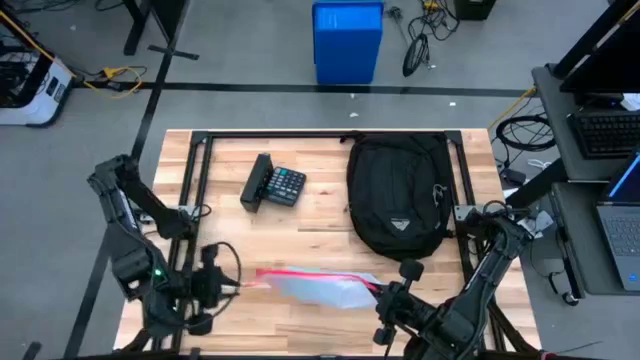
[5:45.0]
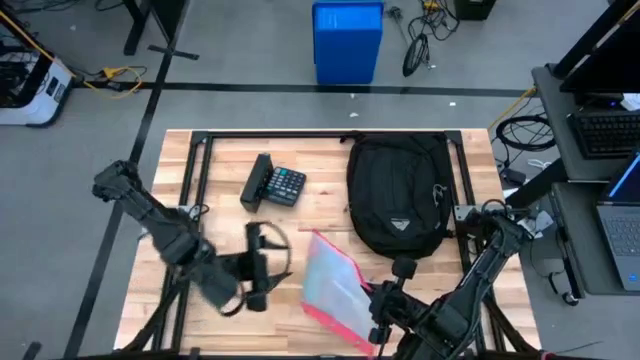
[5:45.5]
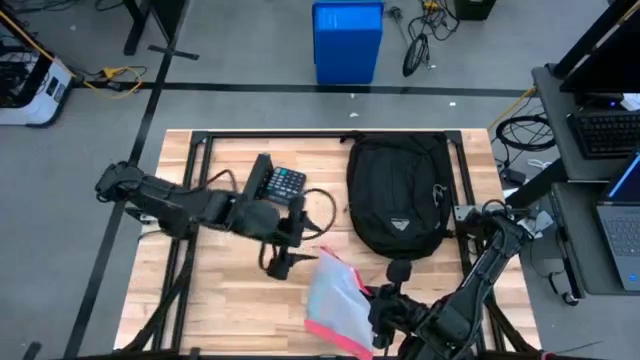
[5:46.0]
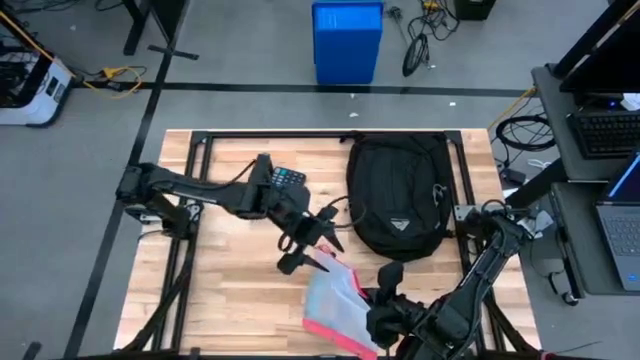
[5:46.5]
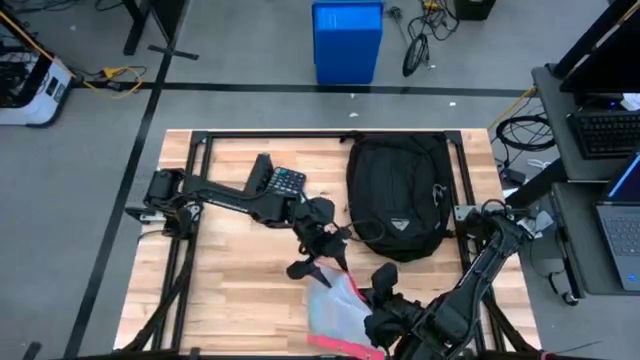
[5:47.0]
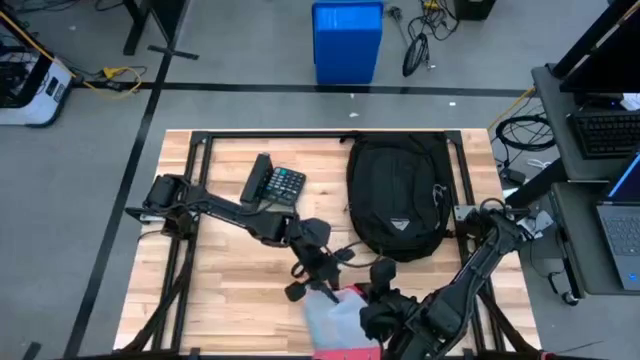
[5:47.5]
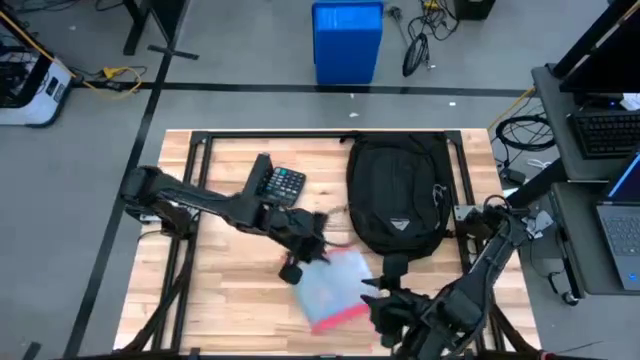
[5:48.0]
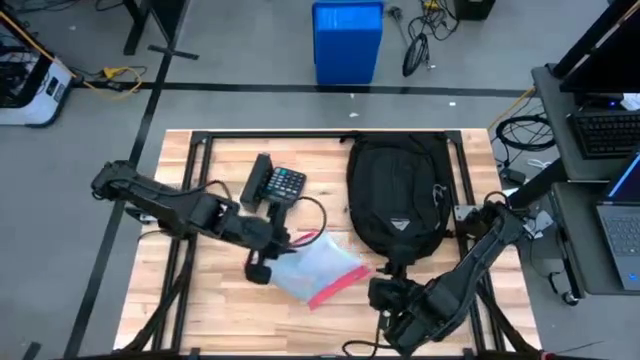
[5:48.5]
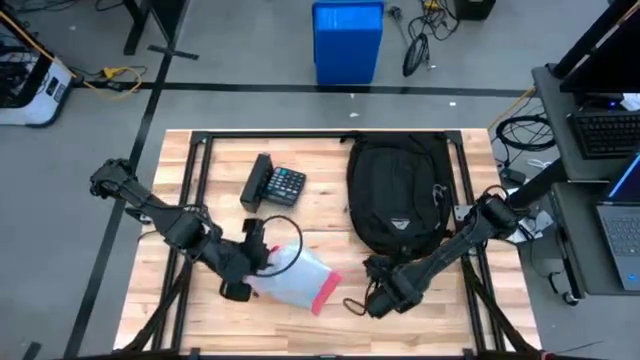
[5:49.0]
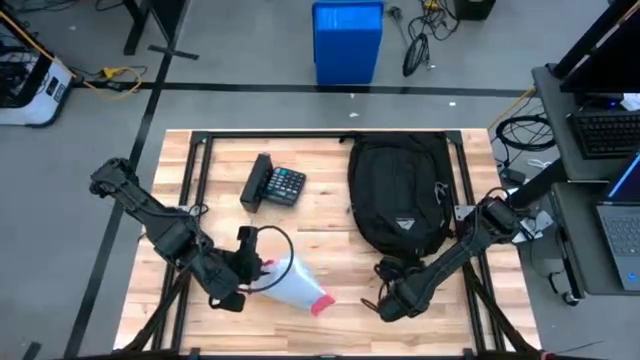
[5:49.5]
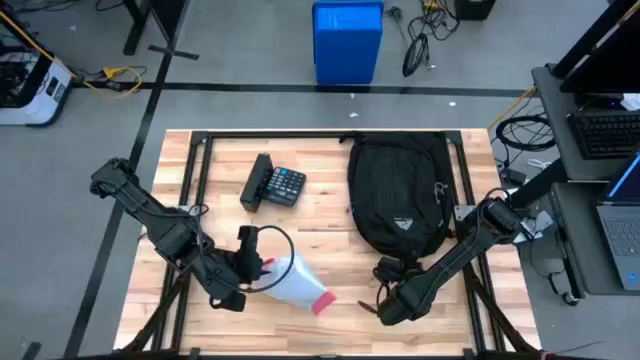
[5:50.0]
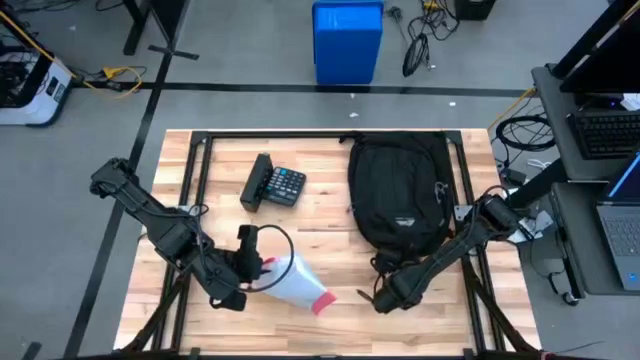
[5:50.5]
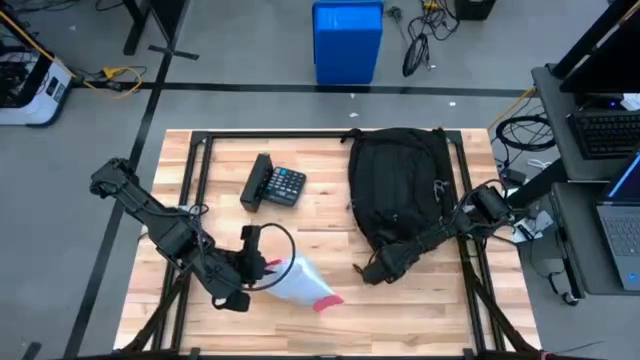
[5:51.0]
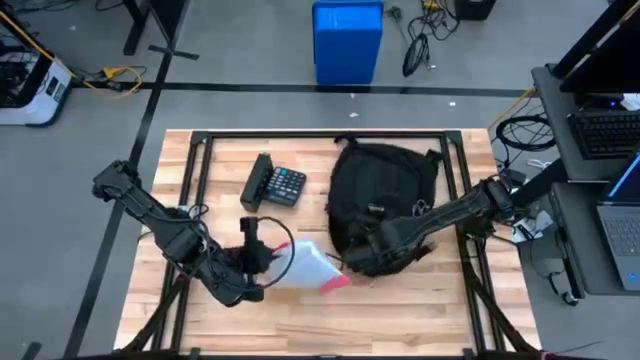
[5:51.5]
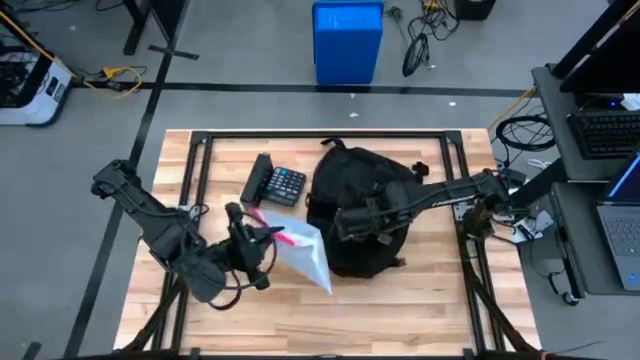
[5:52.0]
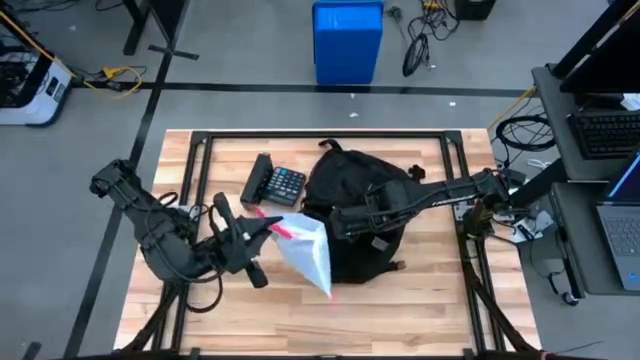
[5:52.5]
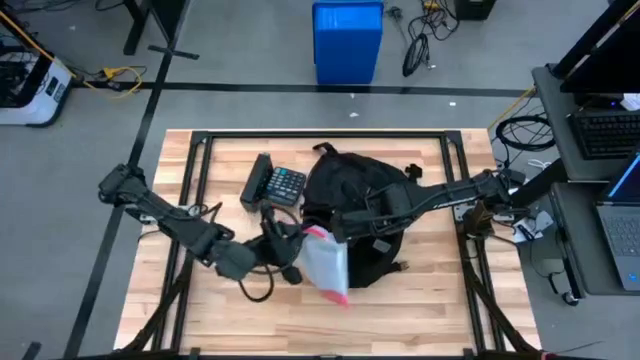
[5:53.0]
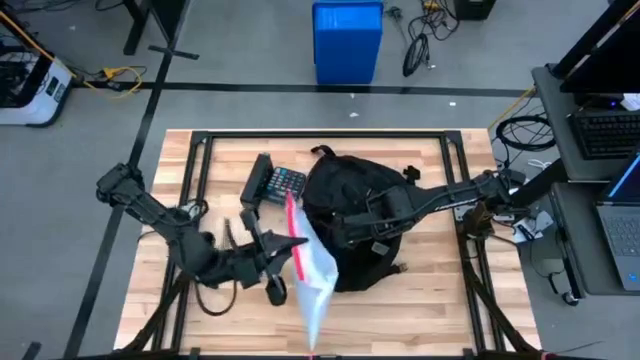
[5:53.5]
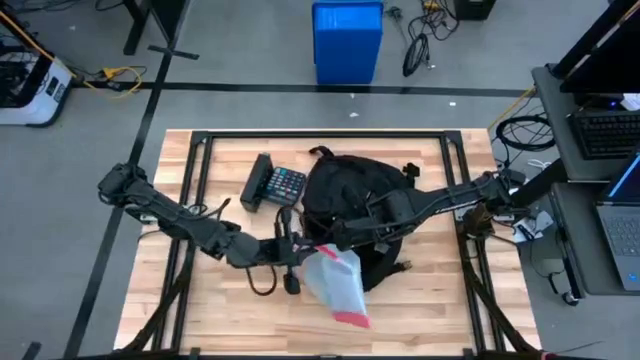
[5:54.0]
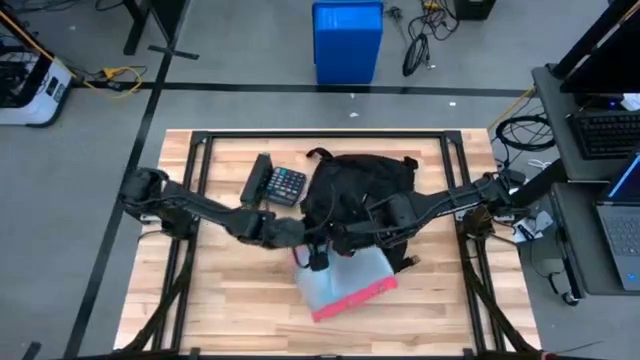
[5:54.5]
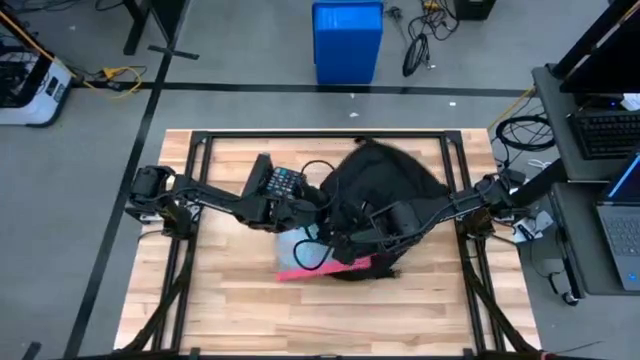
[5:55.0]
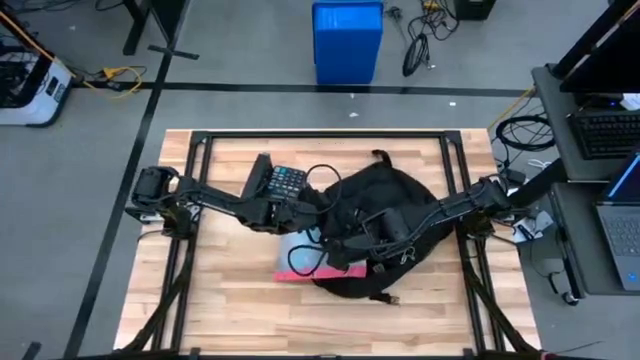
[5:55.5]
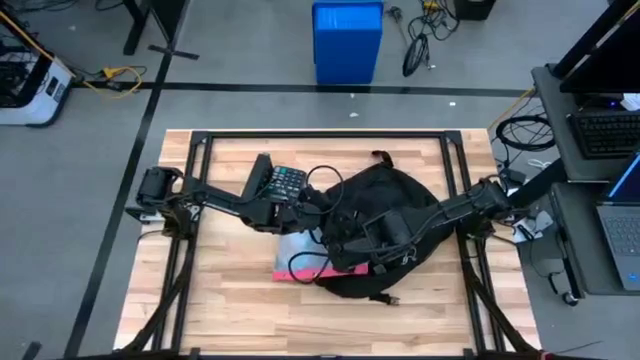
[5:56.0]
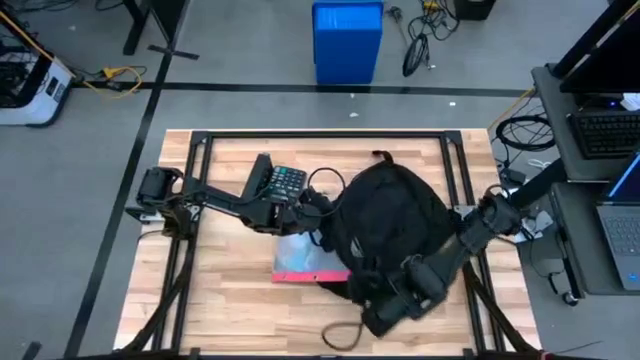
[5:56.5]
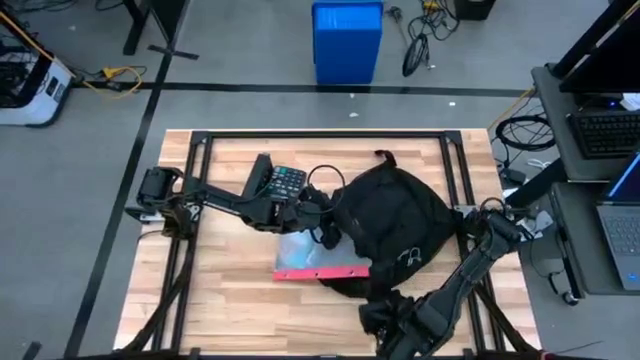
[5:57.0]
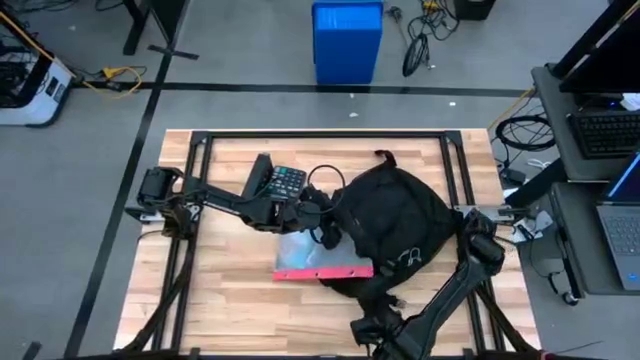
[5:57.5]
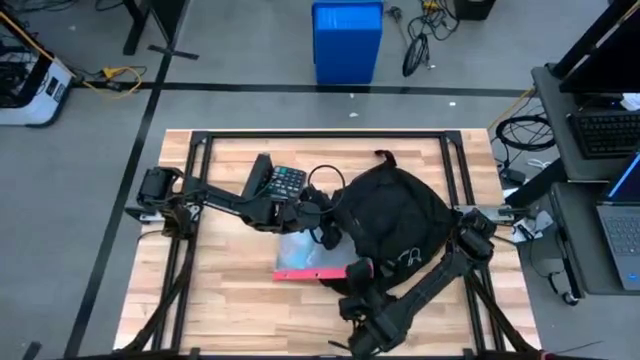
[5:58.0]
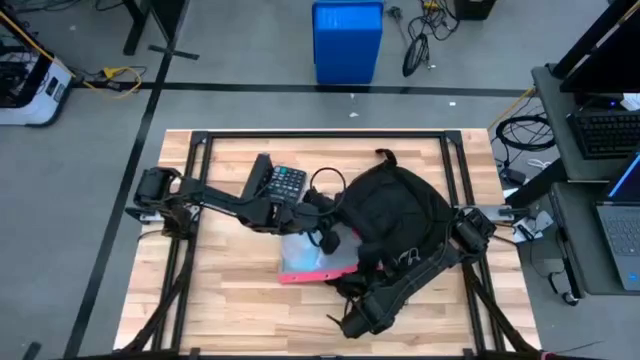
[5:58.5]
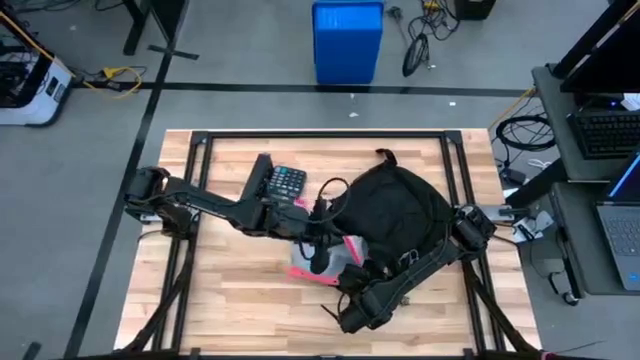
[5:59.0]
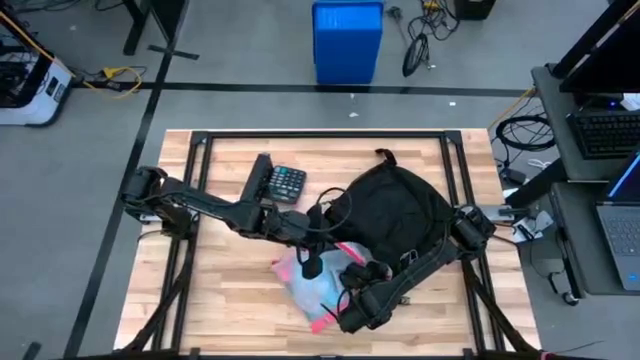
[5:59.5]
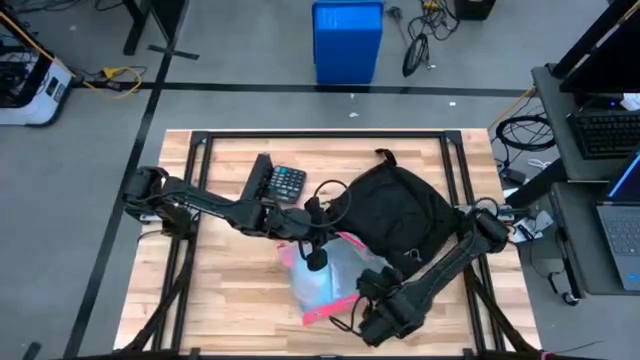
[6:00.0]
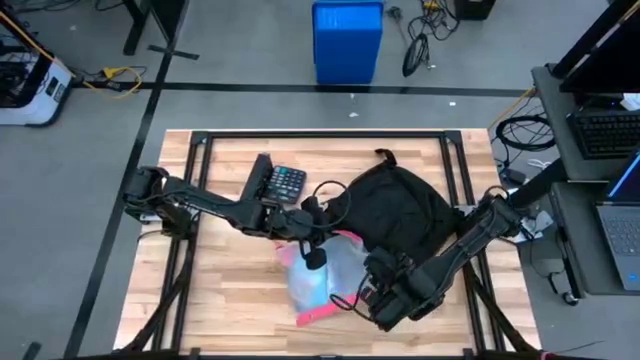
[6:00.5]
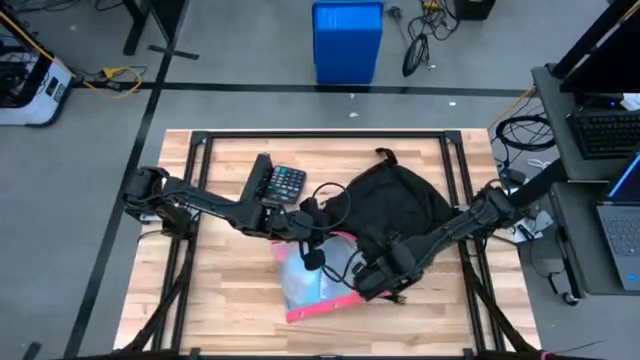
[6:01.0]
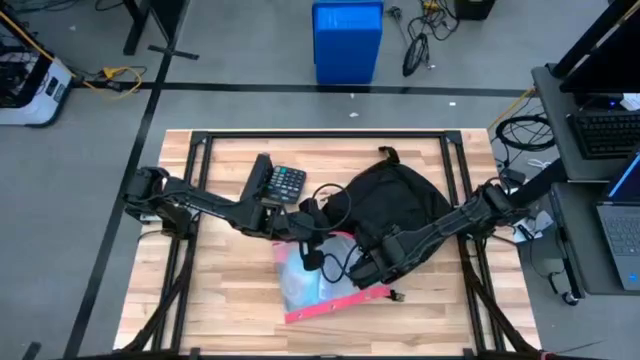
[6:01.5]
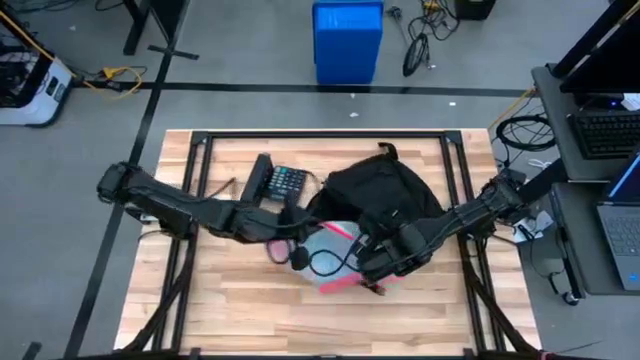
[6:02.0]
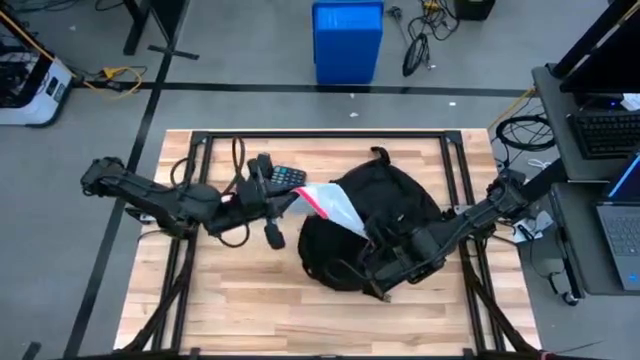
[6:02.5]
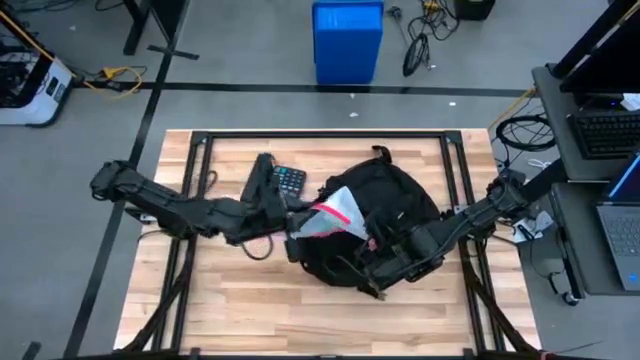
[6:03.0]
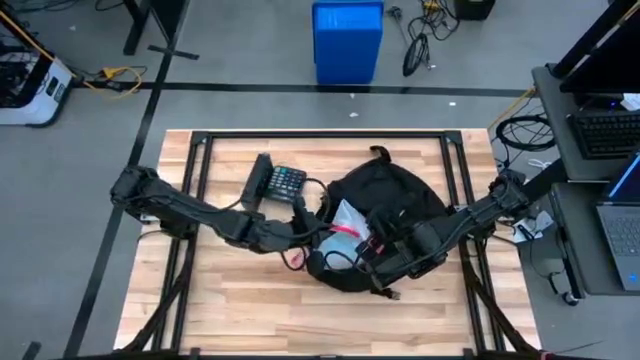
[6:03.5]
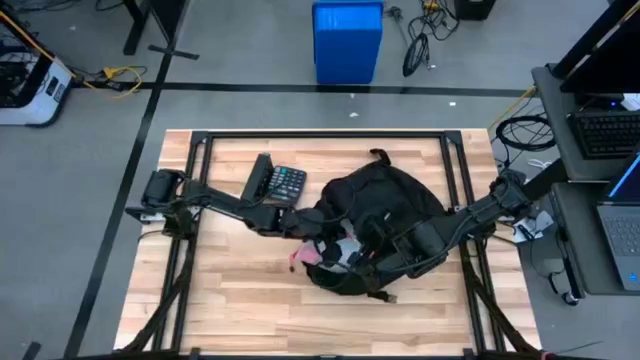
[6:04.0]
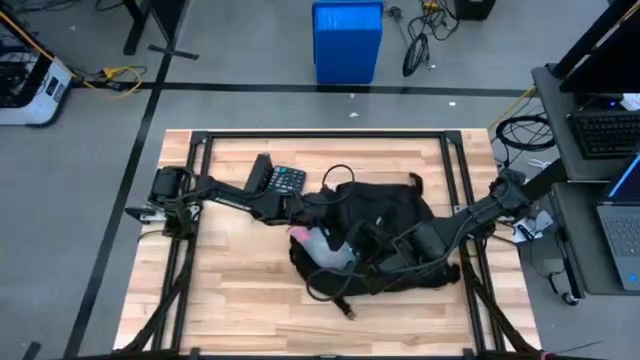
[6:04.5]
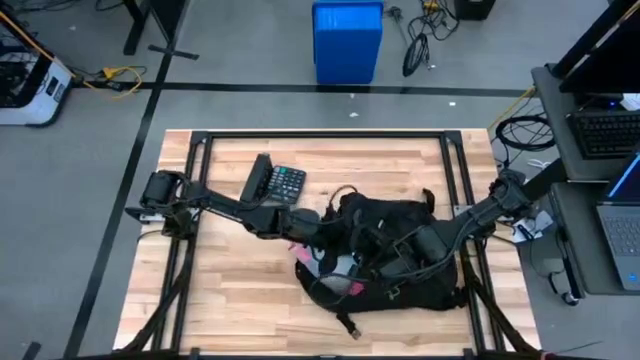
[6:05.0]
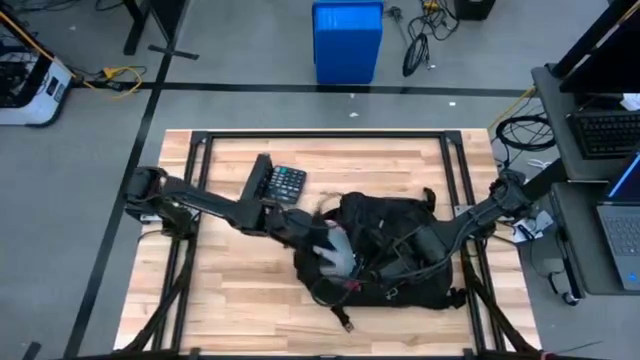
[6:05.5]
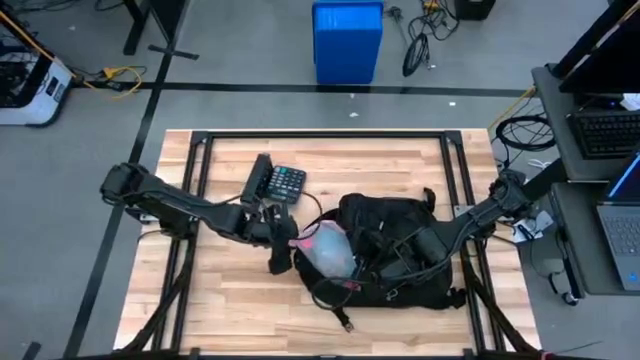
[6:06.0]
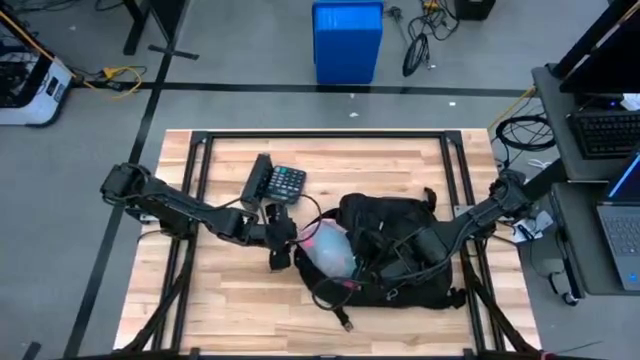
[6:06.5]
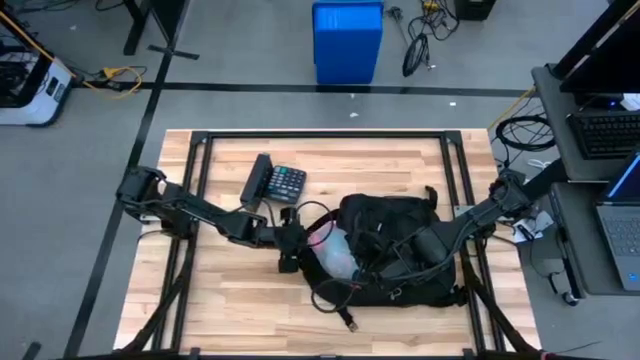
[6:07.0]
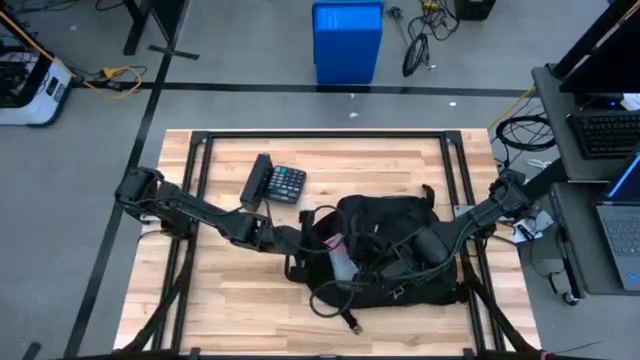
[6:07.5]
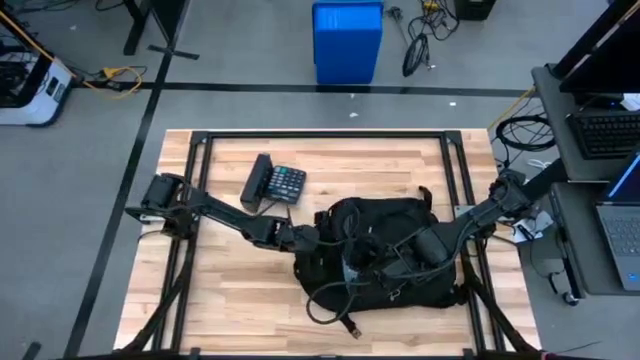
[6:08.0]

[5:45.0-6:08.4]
Task: Unpack backpack
Put the white zip bag into the black backpack
